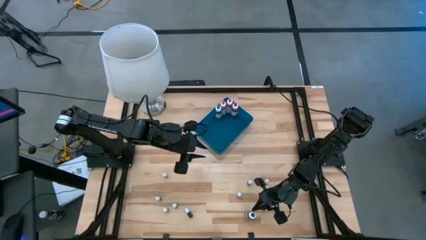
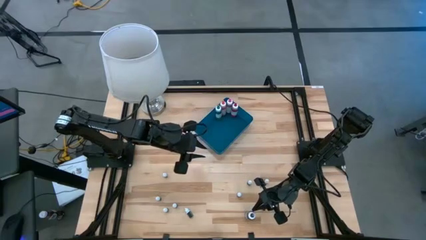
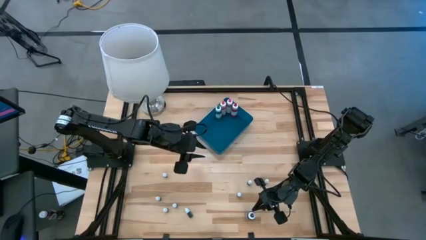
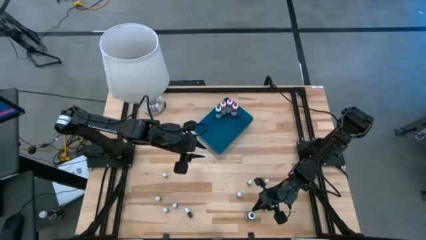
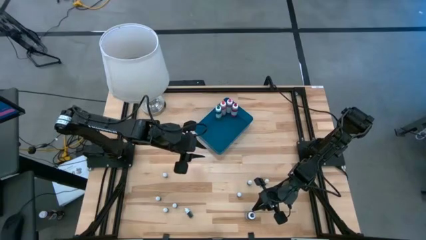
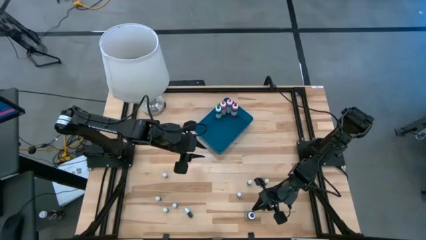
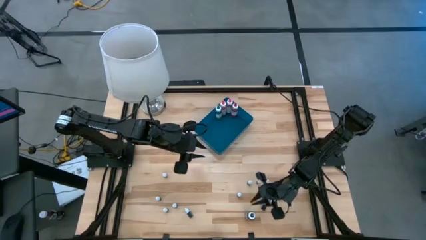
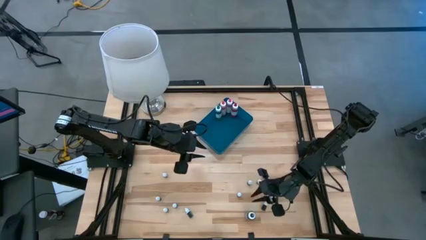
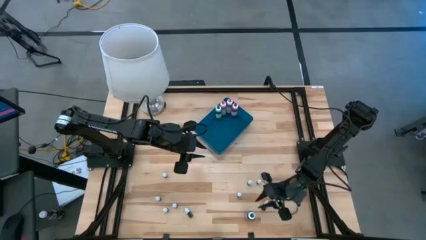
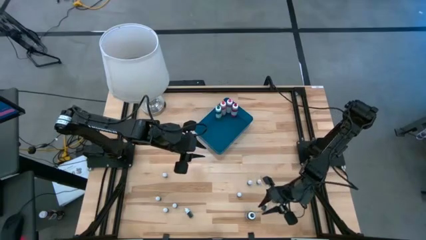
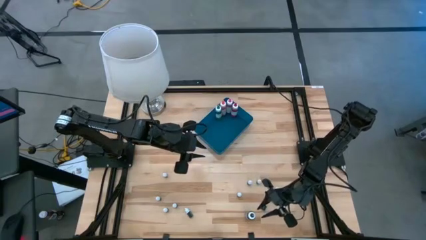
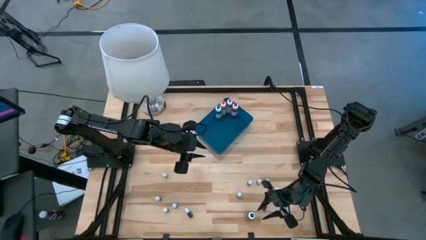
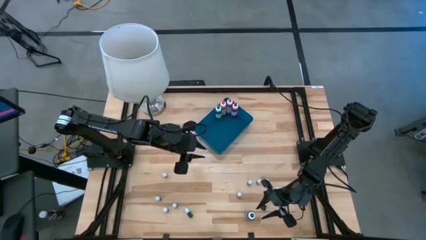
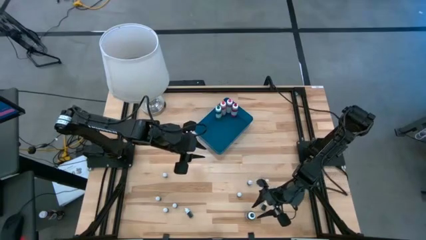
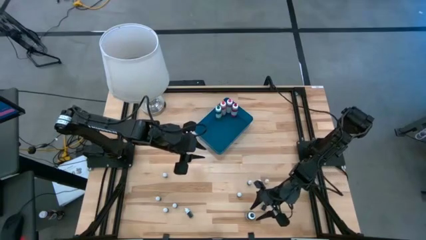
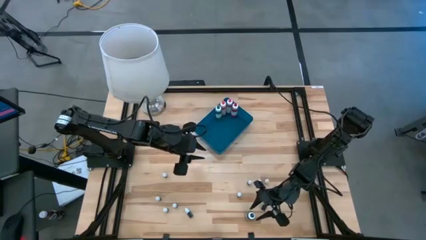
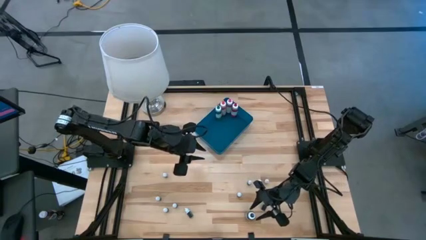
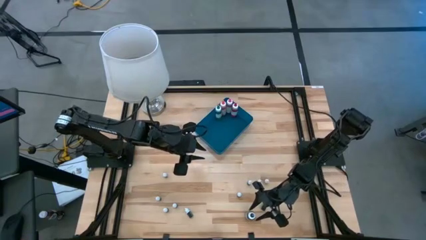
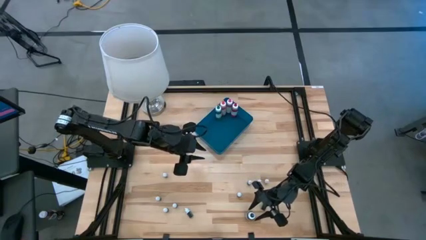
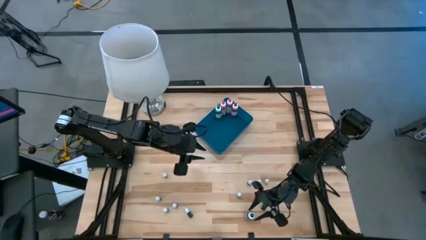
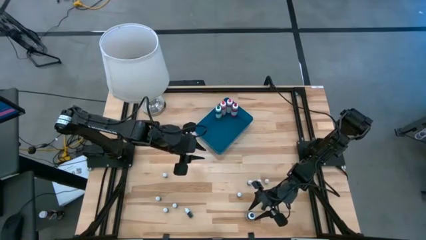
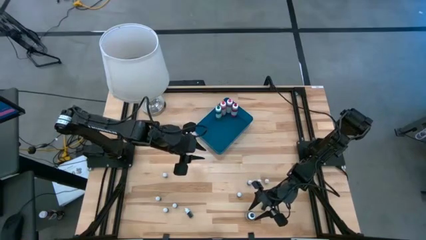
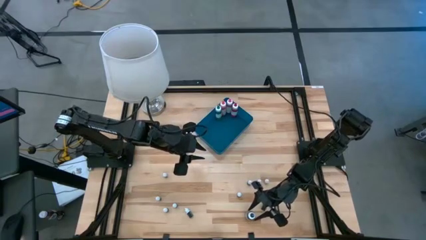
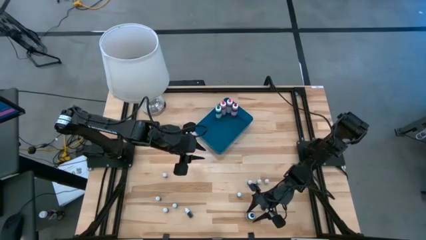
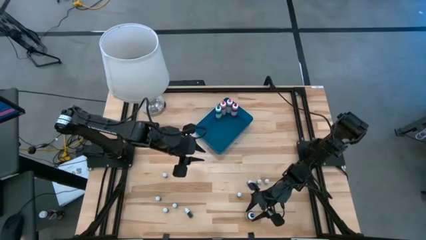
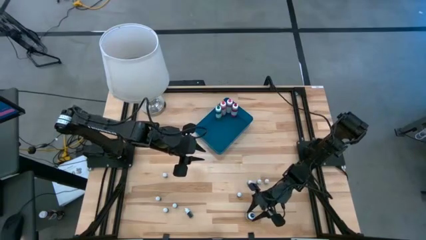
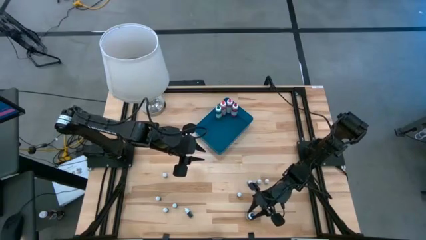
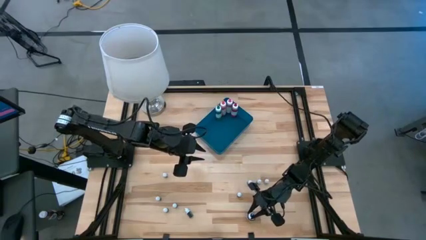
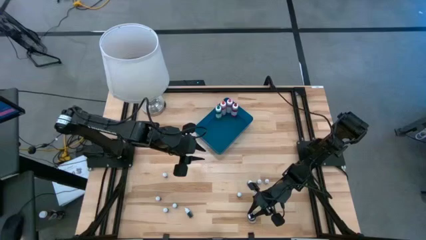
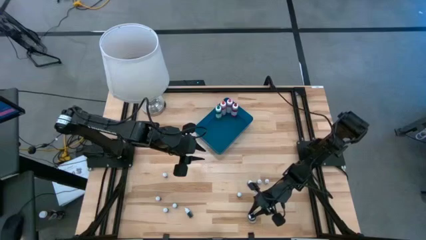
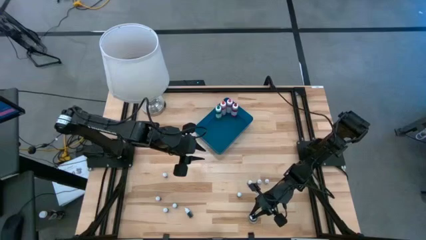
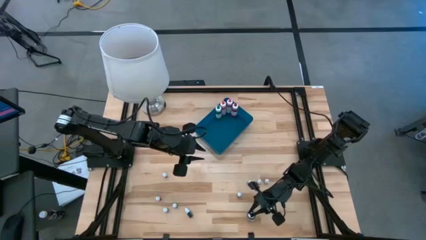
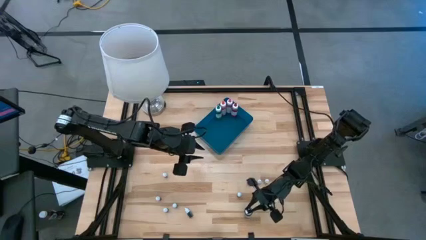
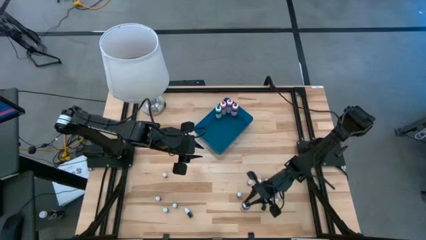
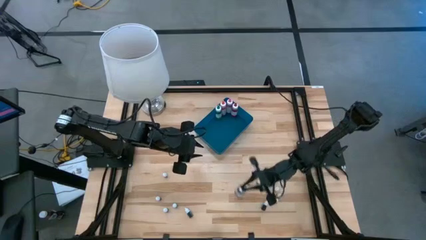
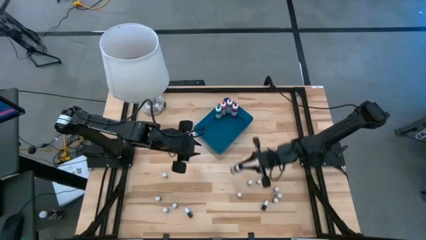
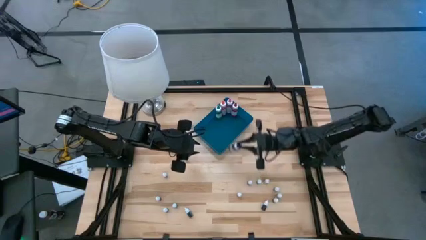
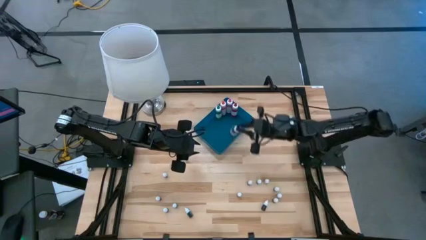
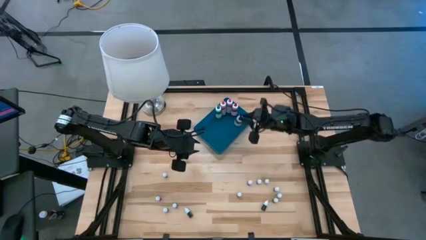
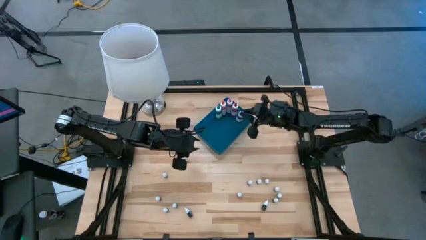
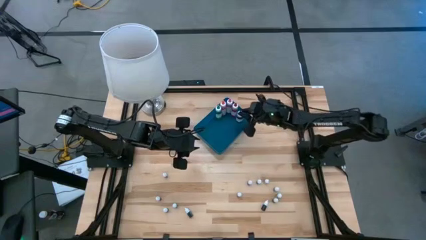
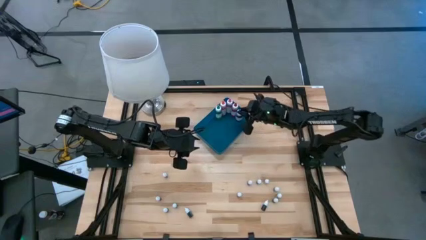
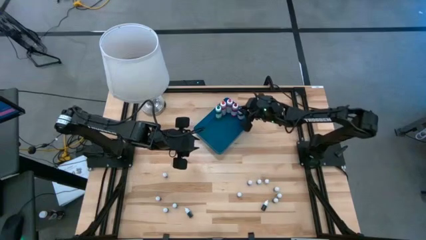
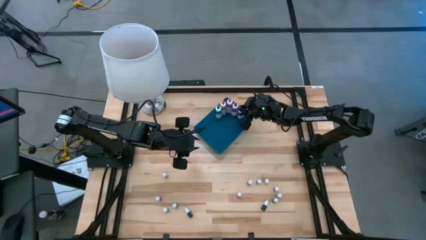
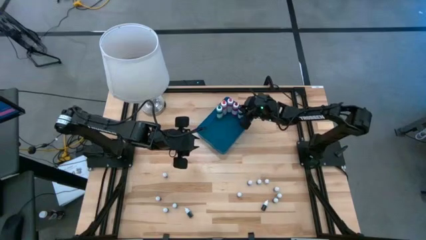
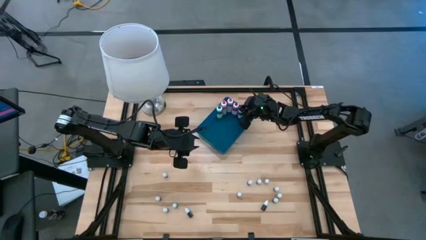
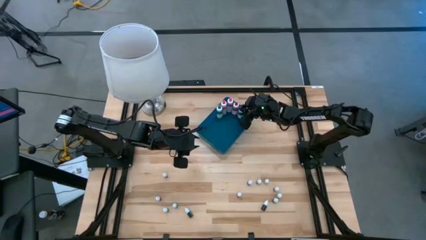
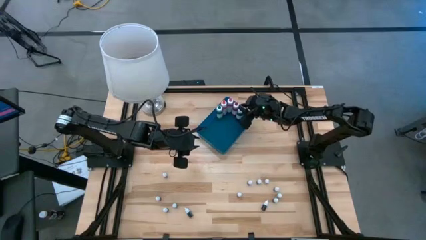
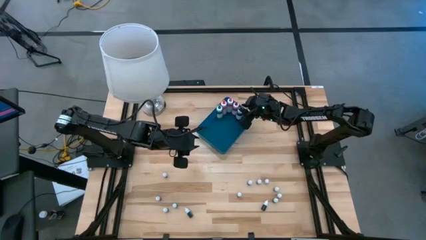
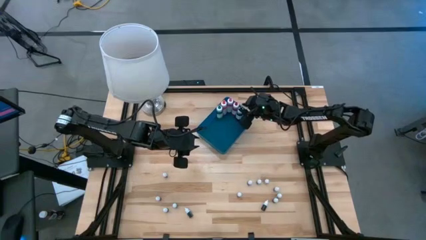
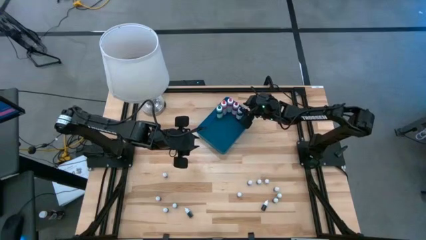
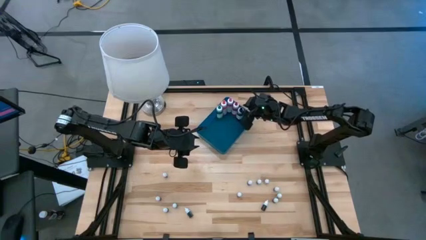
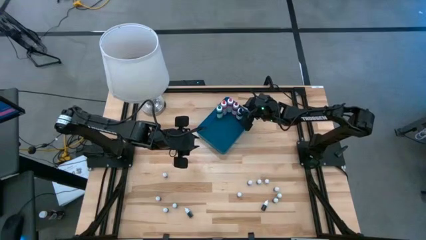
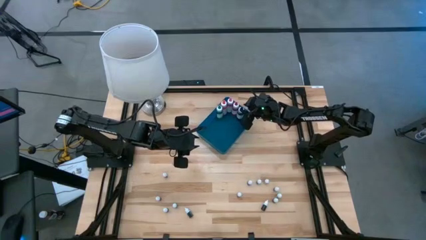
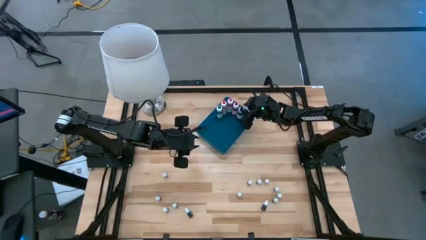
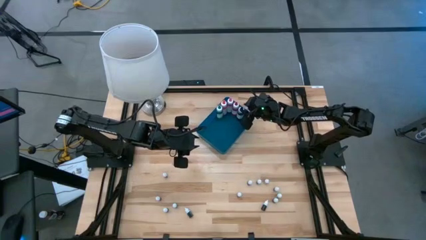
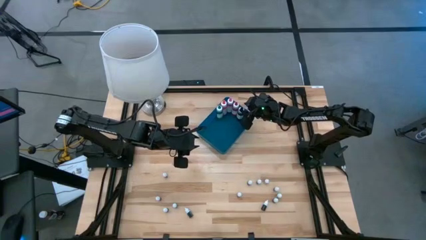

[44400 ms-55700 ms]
Task: Pick & Place food coloring
Put the large black food coloring bottle into the blue container
